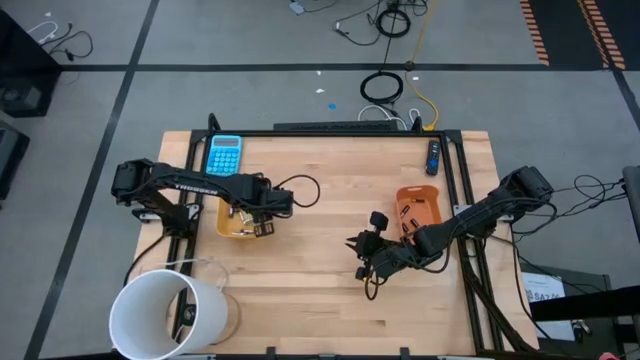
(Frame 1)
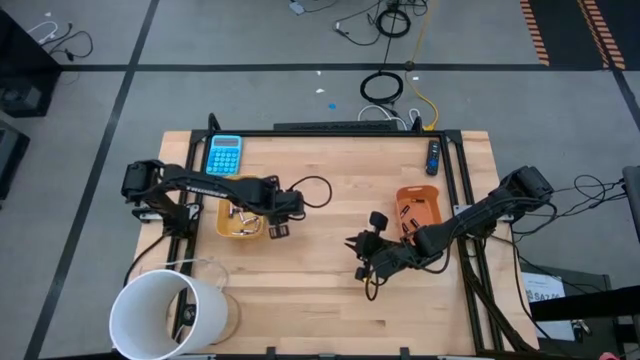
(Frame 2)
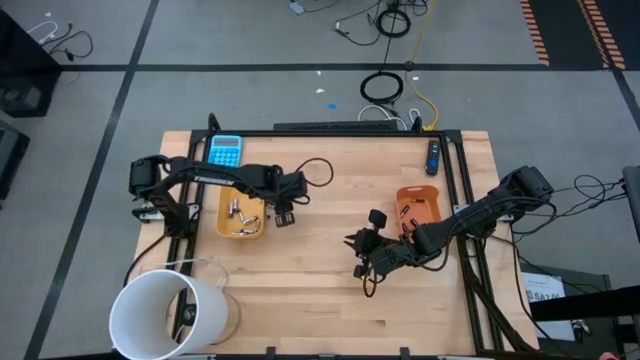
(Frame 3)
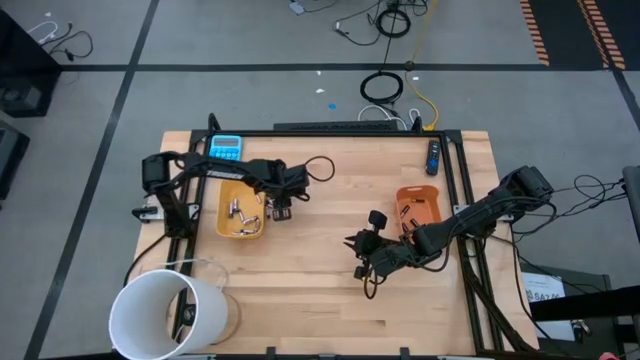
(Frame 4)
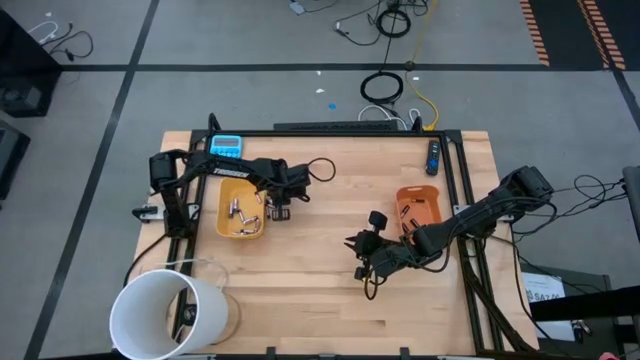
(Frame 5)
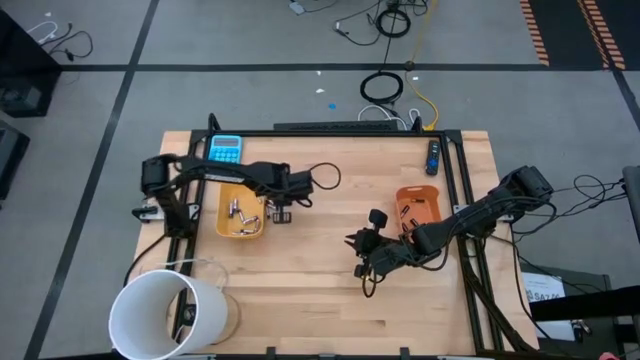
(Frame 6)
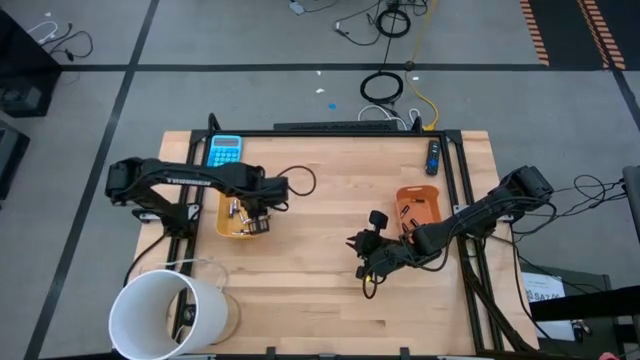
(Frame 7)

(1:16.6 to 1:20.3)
Task: Sort batteries
Put the silver battery into the yellow bin

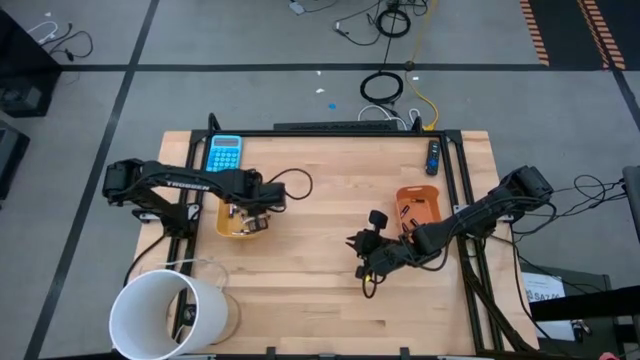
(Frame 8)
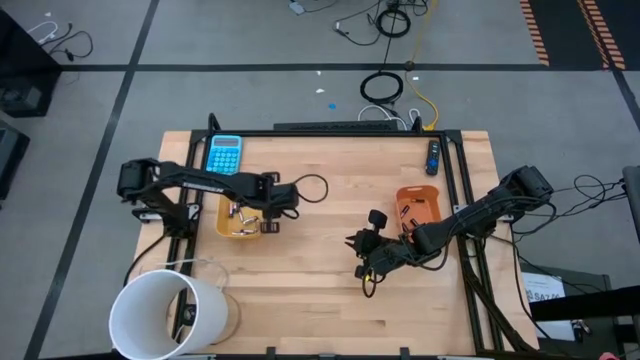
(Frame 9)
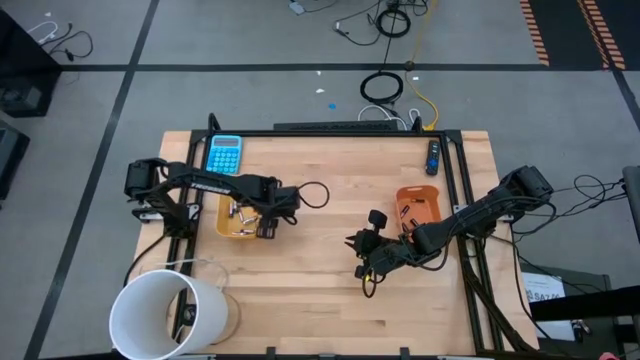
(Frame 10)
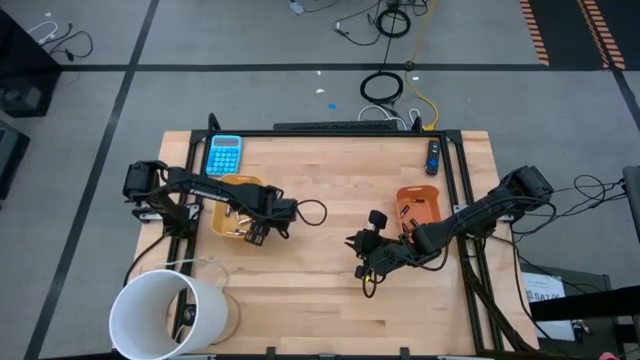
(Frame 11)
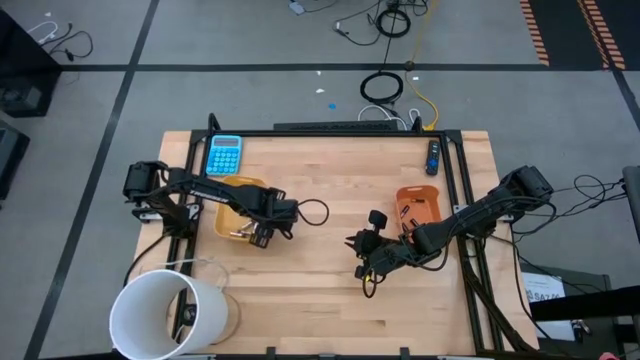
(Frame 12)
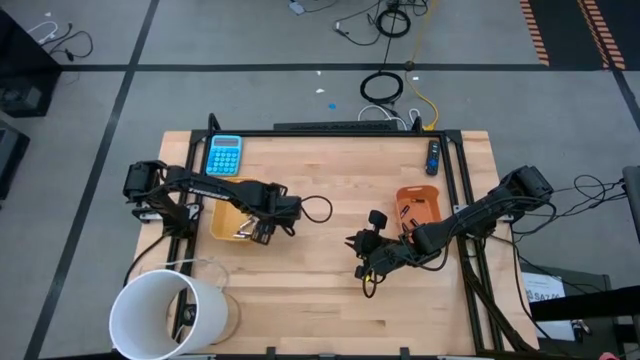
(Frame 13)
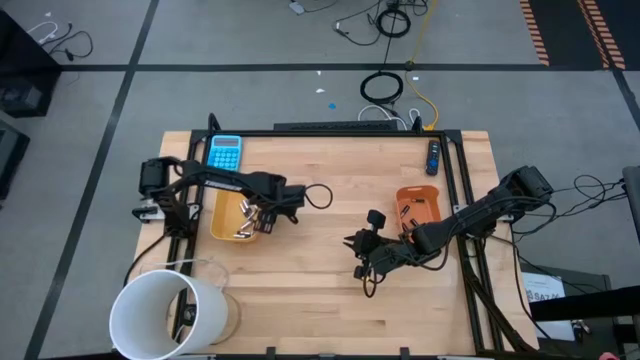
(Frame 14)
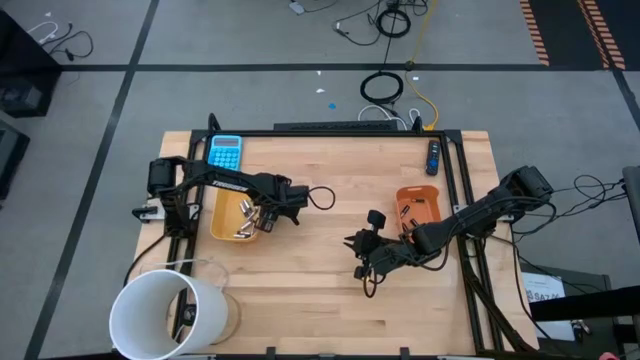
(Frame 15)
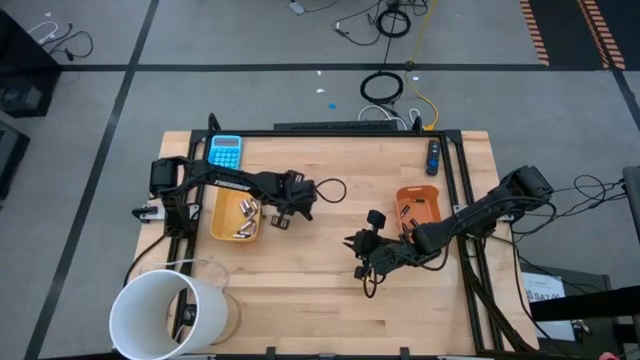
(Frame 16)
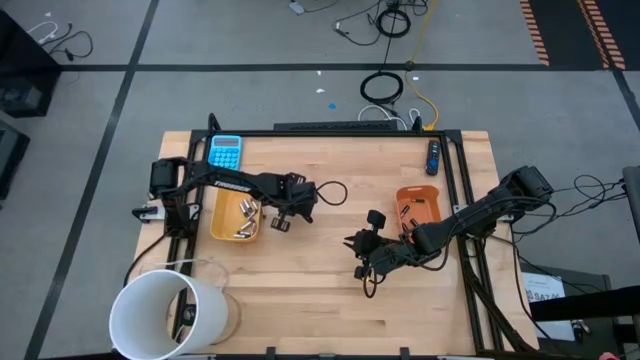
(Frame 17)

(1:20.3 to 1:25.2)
Put the silver battery into the yellow bin

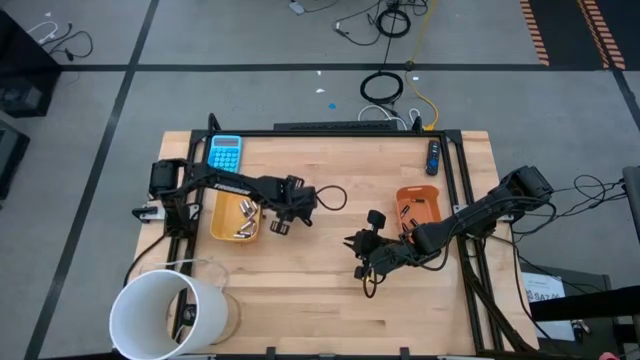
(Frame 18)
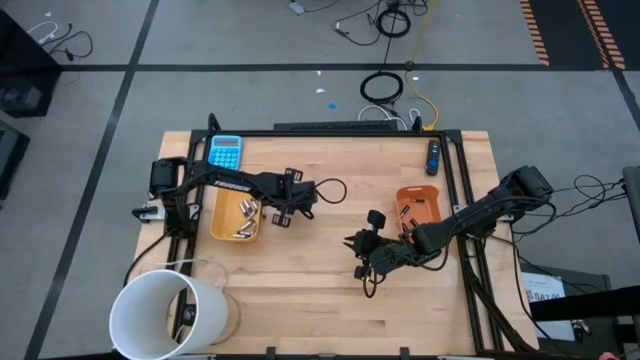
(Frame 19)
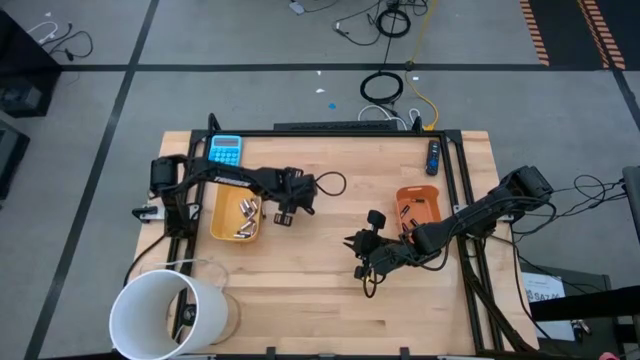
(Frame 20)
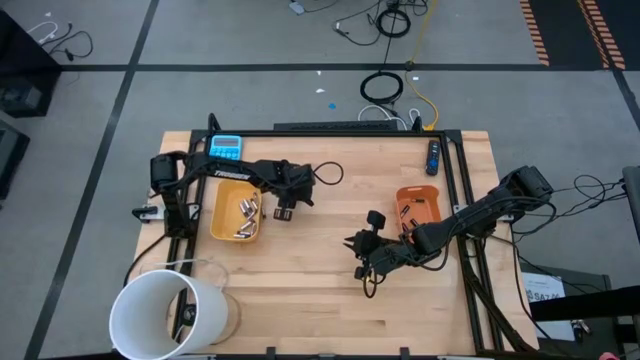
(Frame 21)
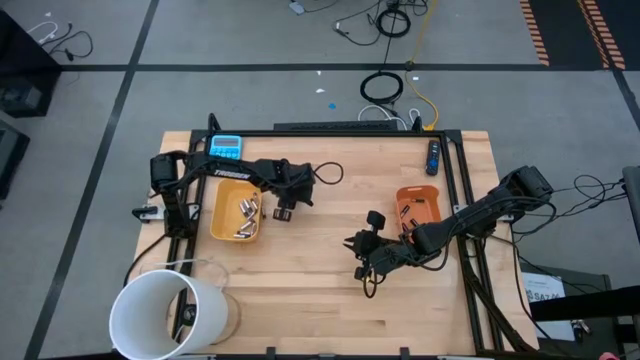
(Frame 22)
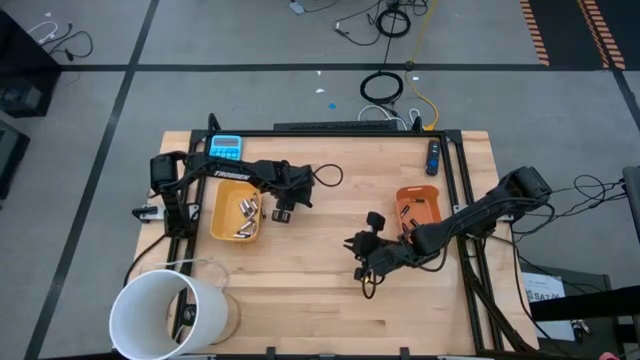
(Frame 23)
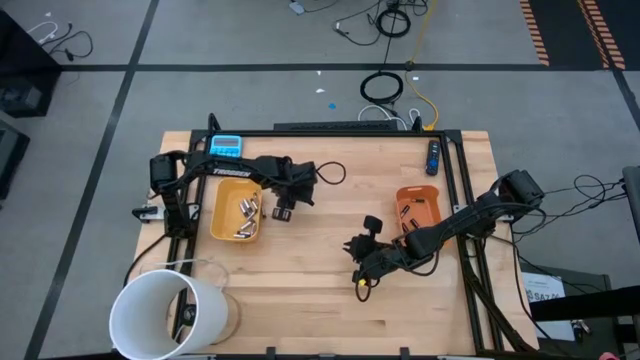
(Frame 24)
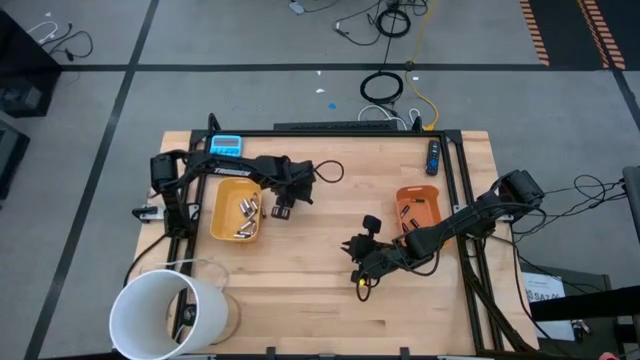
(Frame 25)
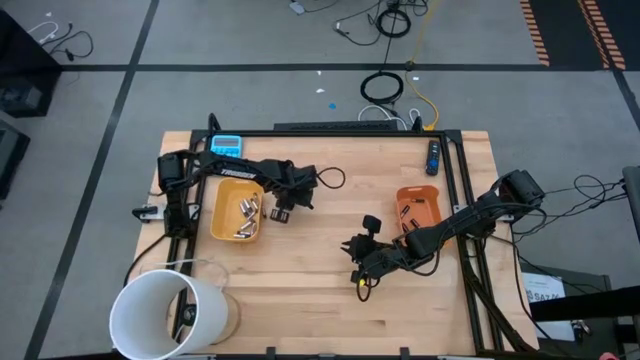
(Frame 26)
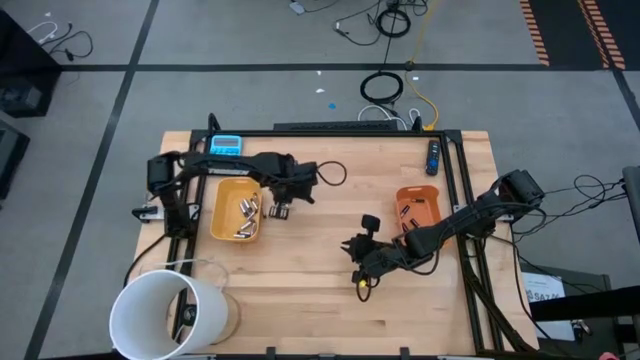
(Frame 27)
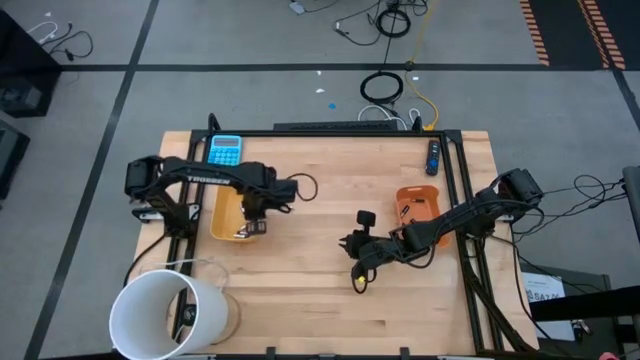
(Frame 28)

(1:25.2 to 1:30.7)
Put the silver battery into the yellow bin

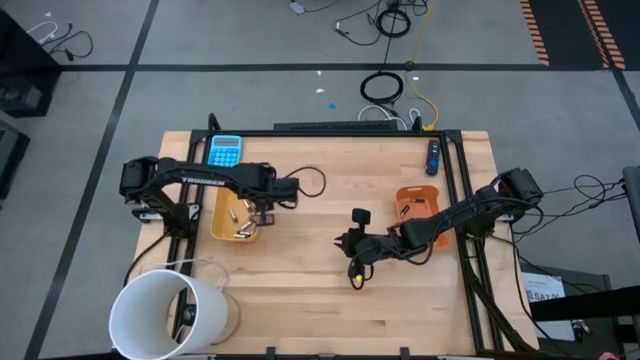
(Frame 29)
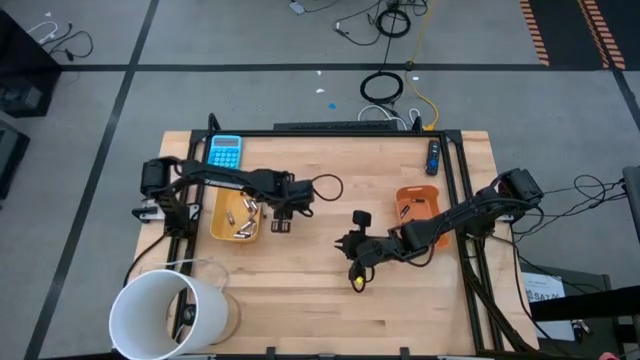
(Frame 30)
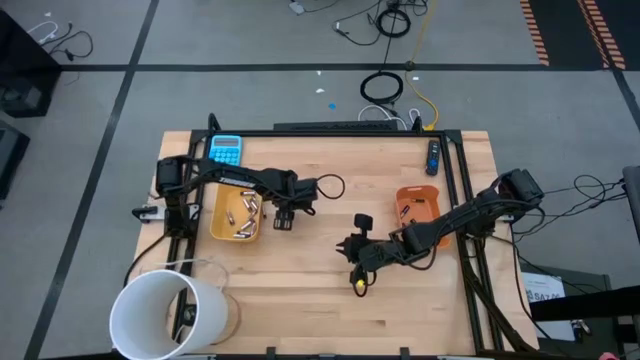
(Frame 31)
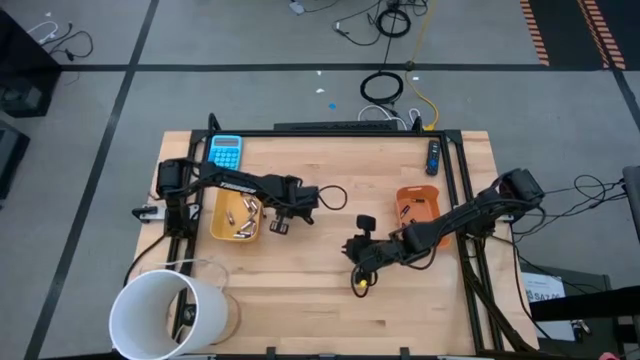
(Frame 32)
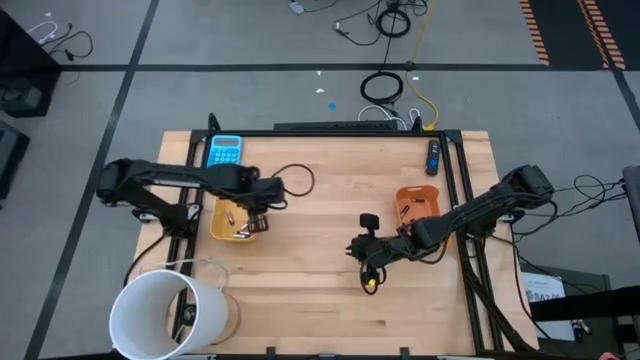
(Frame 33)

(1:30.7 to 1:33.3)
Put the silver battery into the yellow bin

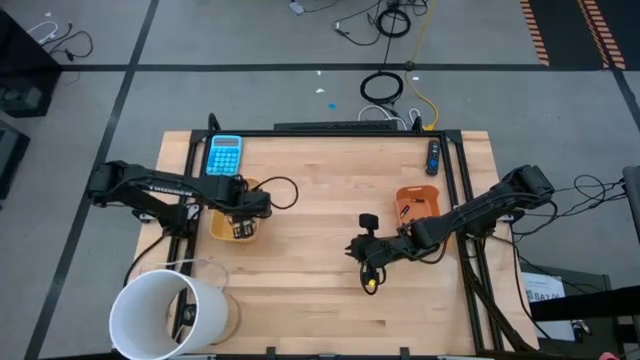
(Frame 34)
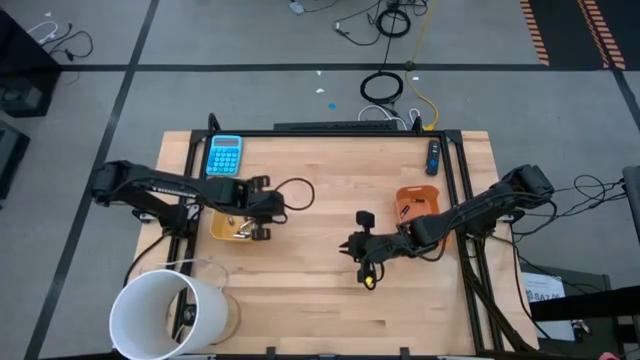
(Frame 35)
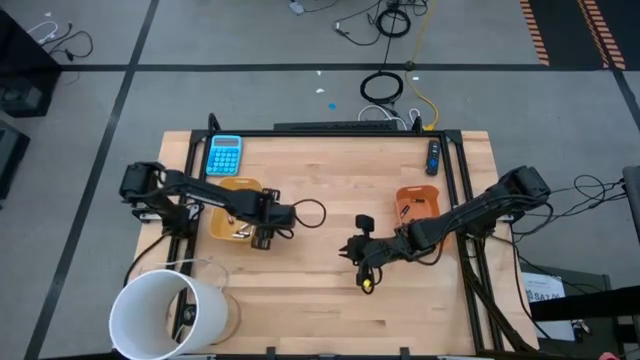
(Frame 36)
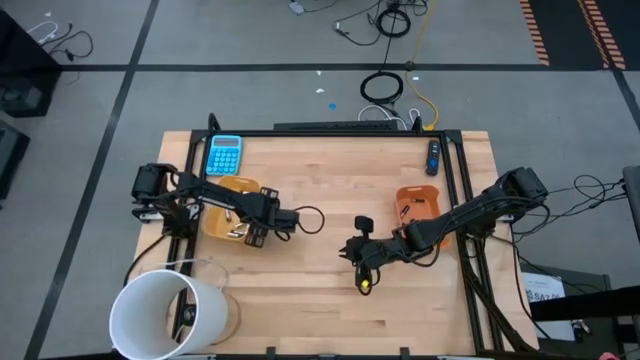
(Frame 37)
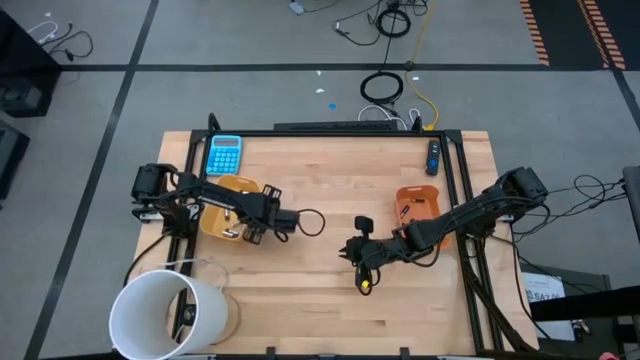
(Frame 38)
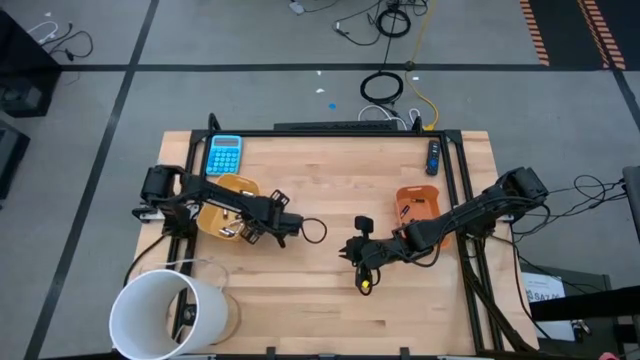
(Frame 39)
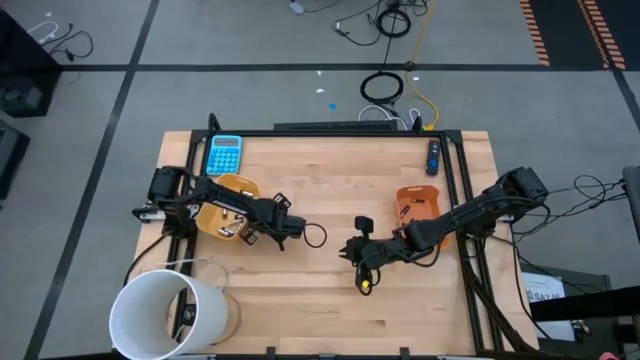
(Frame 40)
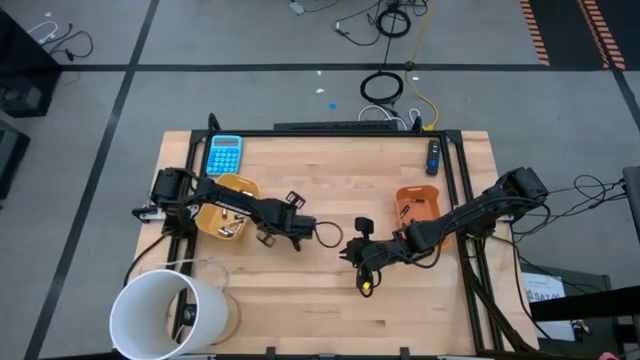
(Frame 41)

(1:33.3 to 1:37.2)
Put the silver battery into the yellow bin

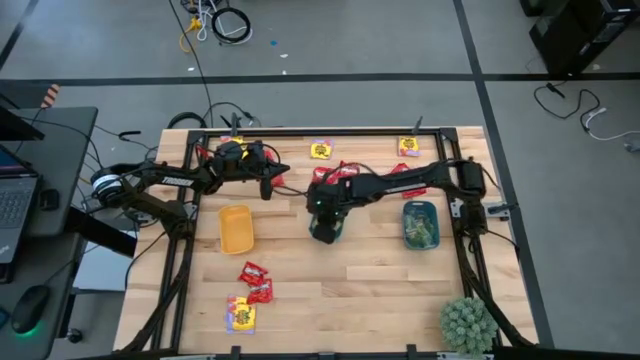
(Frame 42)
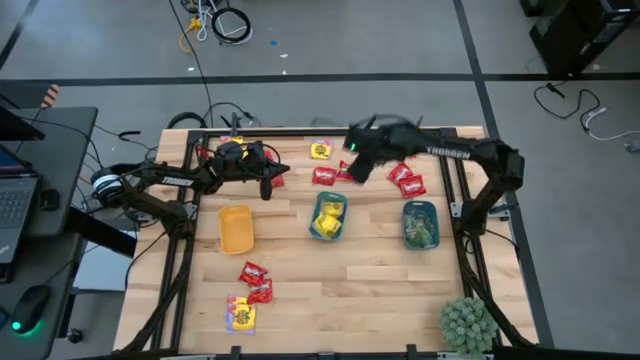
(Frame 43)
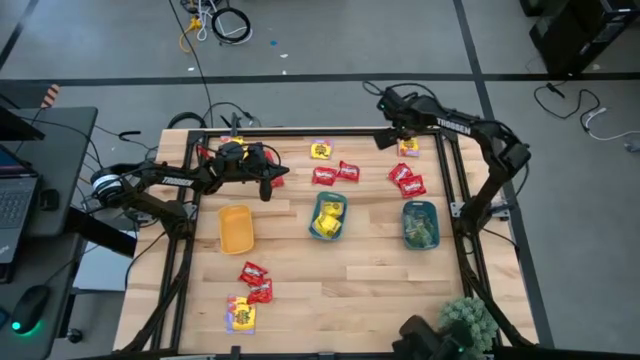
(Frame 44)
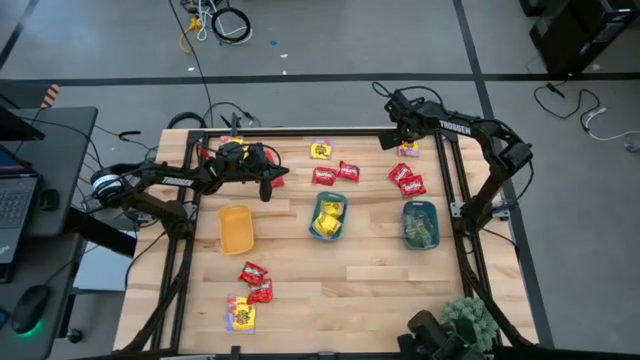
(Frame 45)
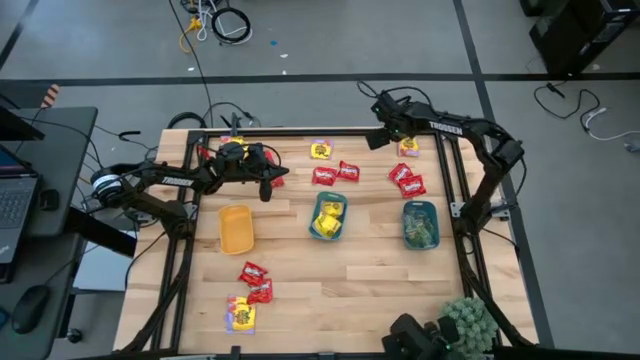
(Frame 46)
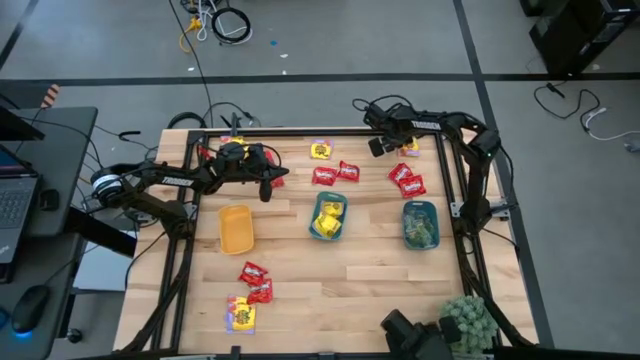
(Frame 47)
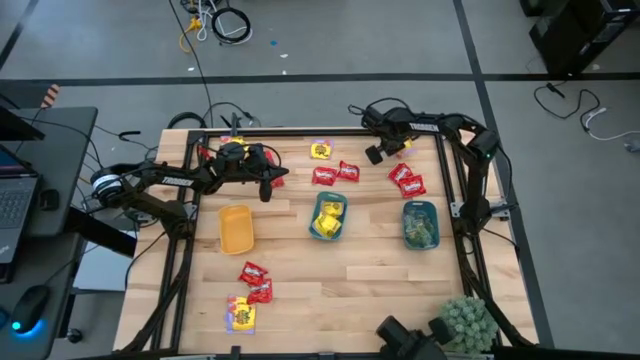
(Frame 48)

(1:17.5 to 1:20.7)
Task: Sort candy
Put the yellow candy pack into the green bin
